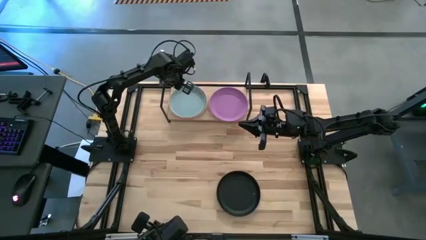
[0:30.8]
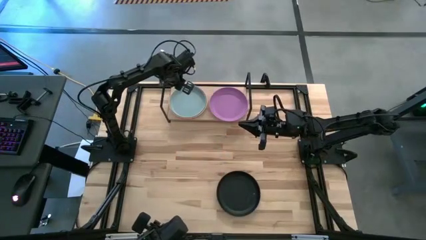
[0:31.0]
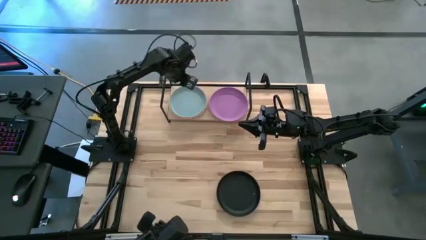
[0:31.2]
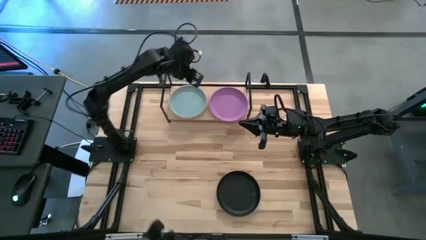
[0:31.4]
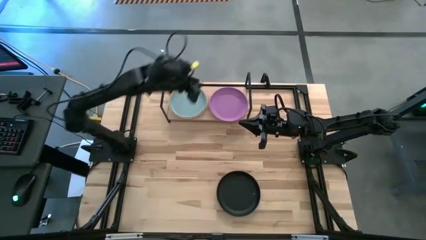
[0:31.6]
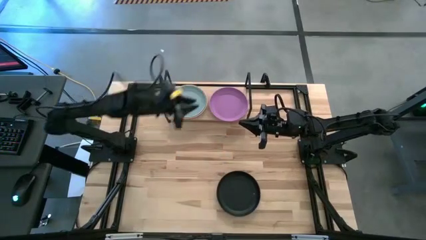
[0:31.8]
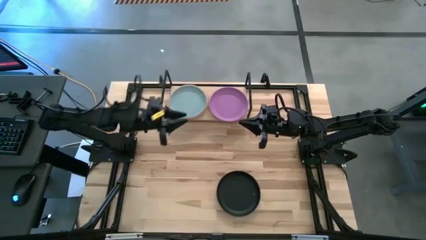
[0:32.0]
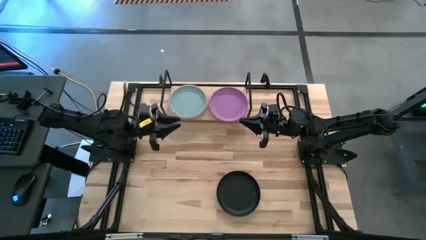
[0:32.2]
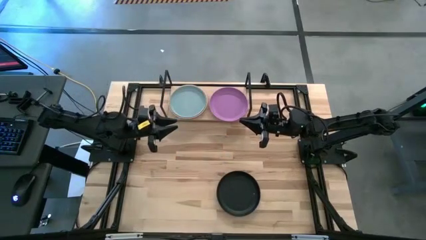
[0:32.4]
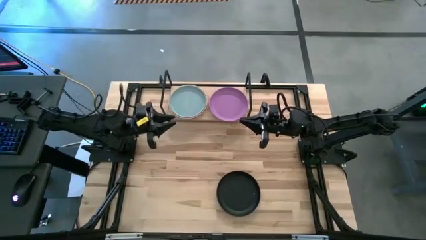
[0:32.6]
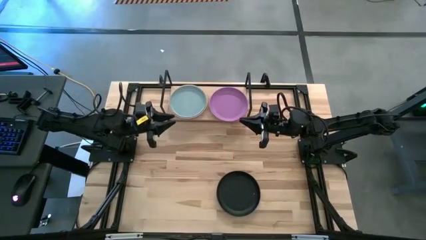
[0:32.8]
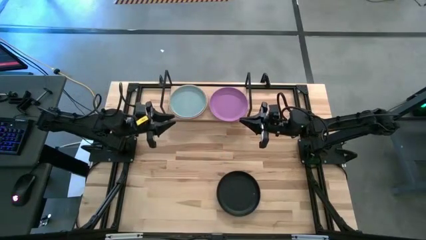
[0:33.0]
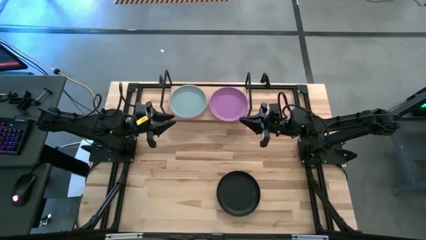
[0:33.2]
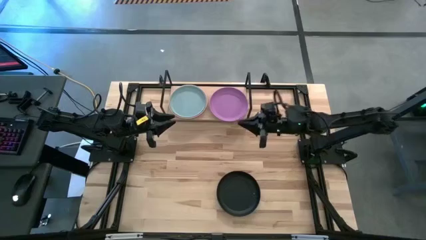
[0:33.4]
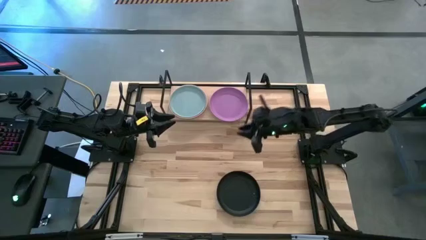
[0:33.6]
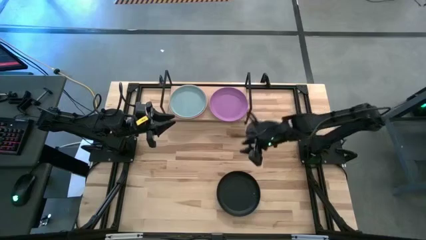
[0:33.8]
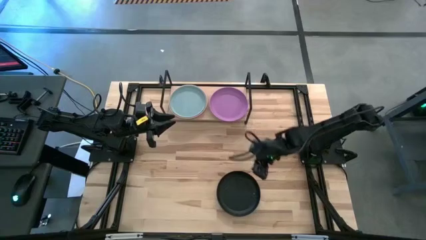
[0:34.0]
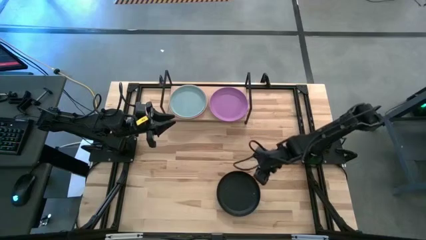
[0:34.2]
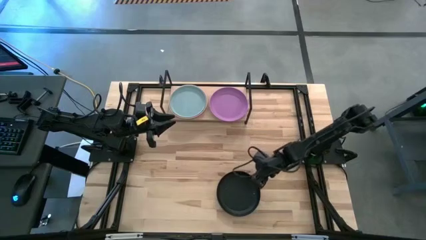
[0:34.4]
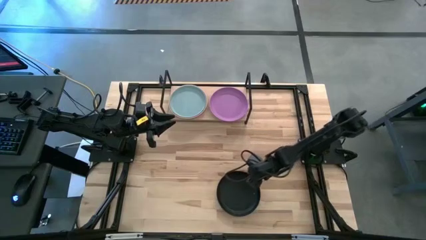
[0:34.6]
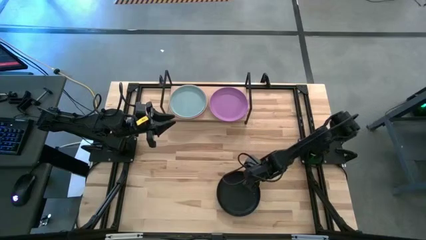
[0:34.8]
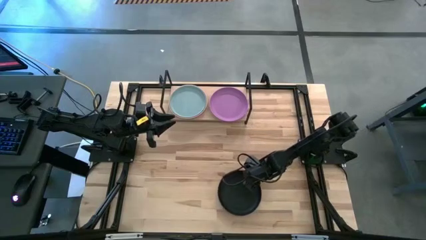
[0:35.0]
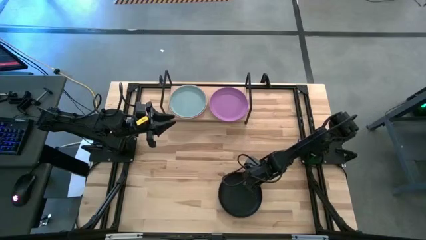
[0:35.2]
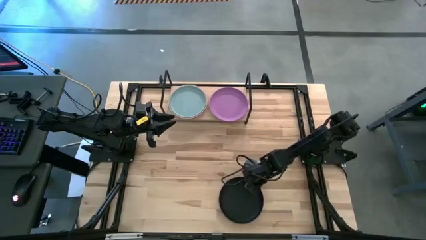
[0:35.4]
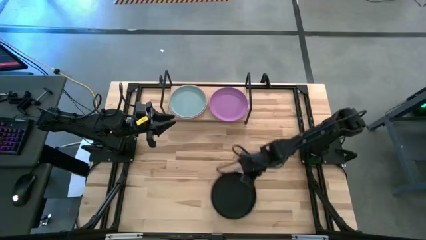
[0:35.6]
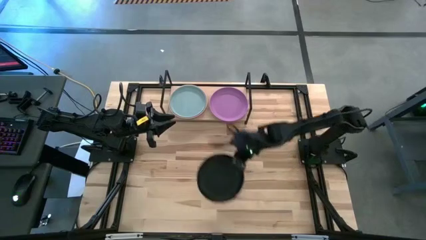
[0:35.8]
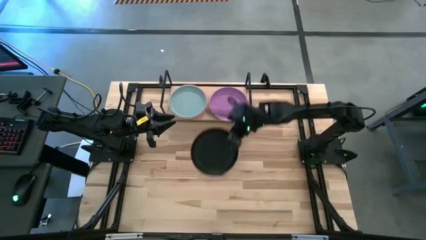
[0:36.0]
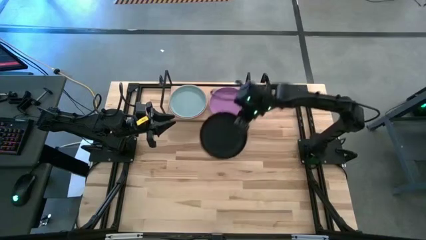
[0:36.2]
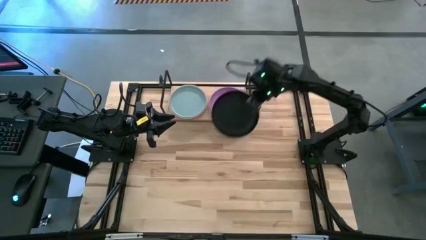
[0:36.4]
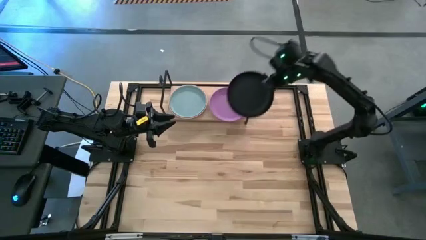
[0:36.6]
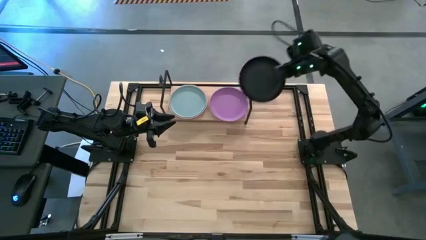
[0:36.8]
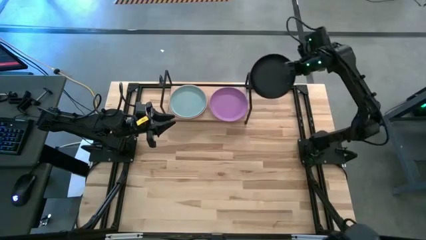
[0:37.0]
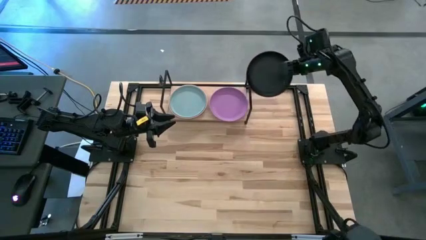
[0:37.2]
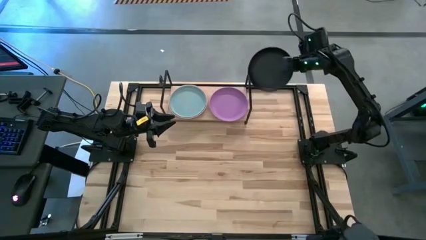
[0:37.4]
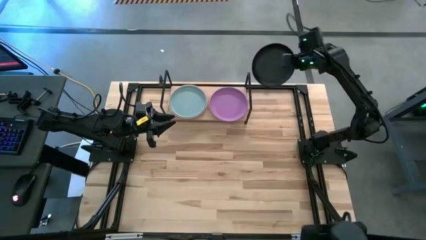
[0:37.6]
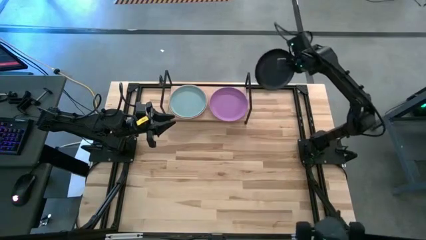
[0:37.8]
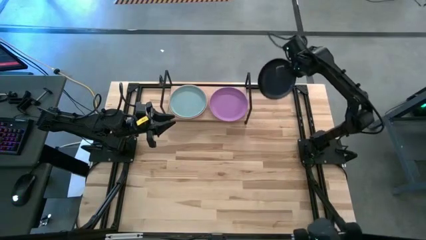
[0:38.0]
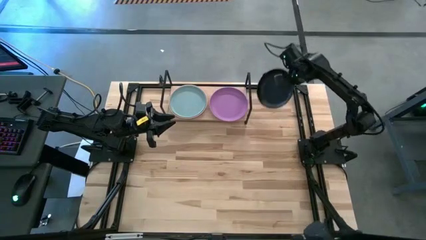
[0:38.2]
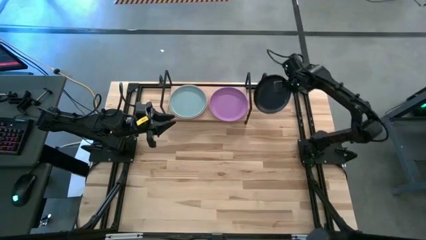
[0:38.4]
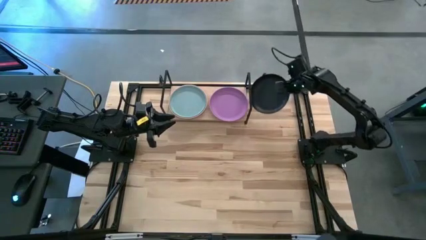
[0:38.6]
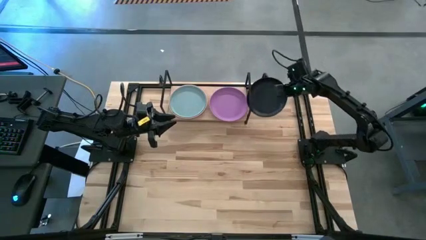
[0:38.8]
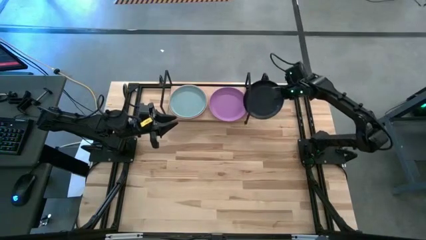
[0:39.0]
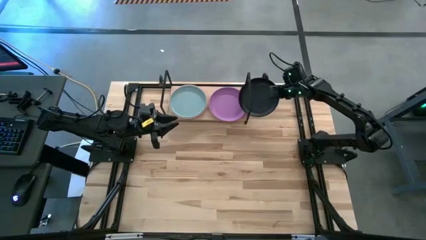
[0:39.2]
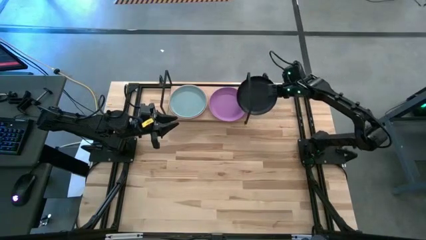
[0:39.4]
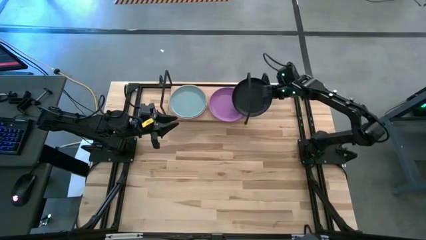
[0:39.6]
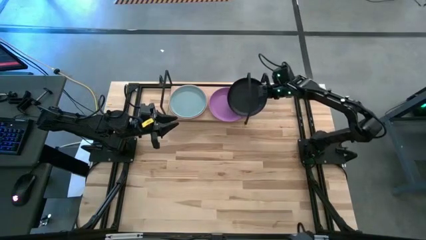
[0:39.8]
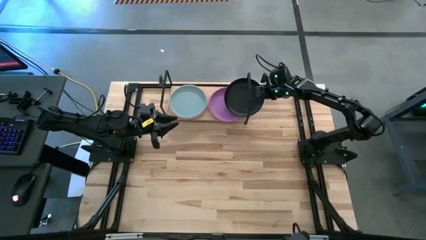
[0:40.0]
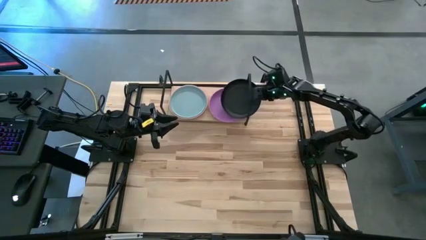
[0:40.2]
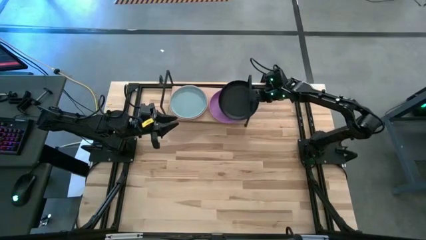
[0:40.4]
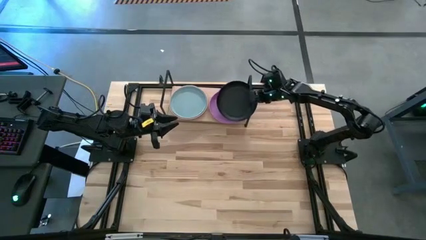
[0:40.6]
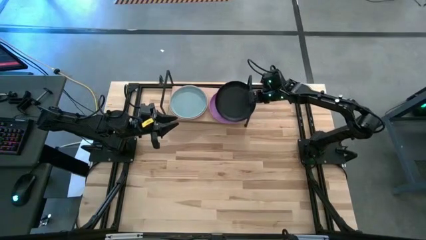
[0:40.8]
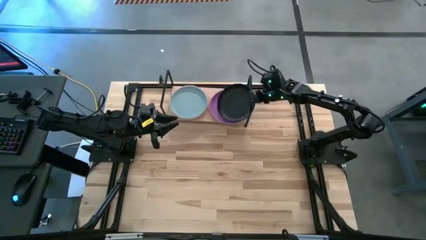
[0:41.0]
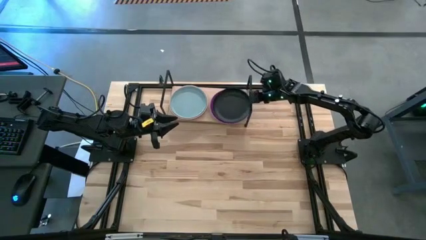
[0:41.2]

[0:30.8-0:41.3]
Task: Place and stack plates onto a shelf
Stack the black plate on top of the purple plate on the shelf
